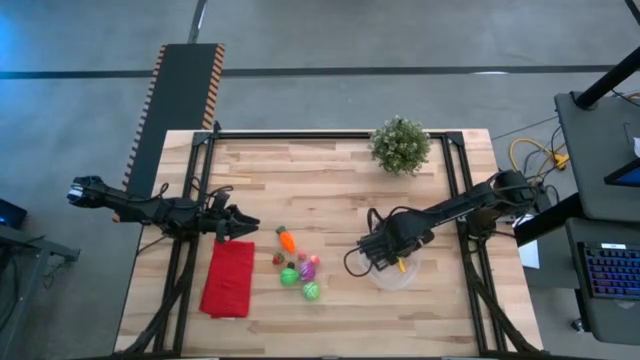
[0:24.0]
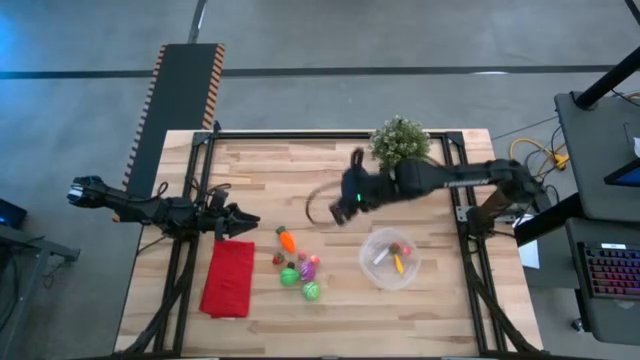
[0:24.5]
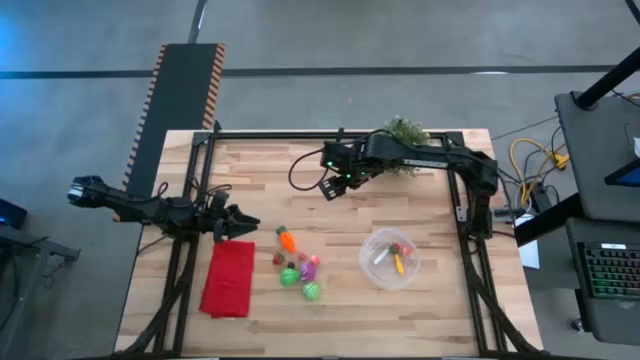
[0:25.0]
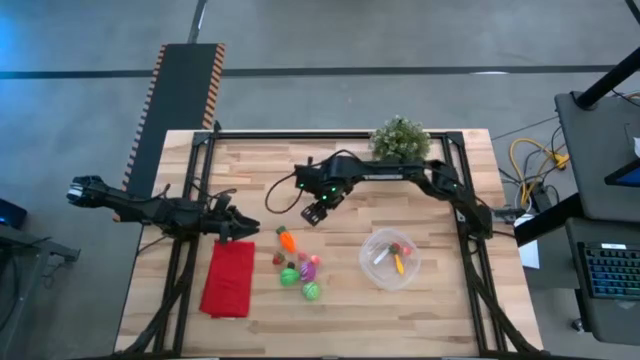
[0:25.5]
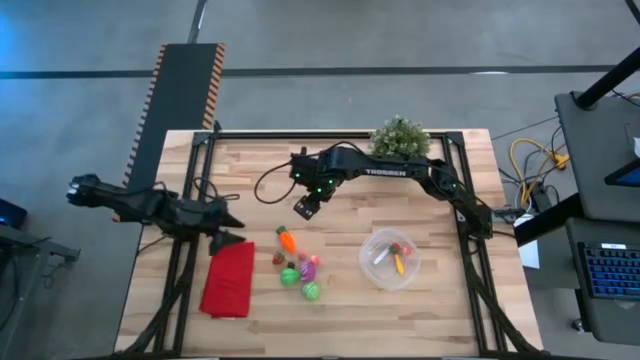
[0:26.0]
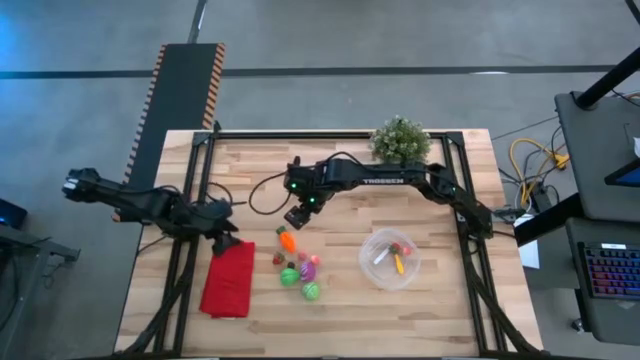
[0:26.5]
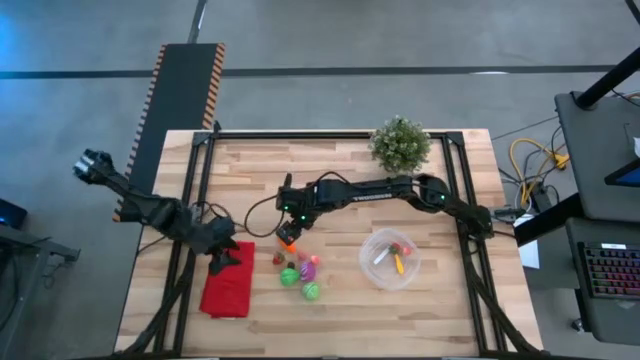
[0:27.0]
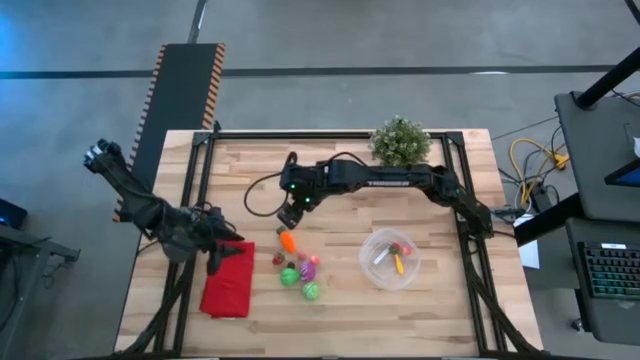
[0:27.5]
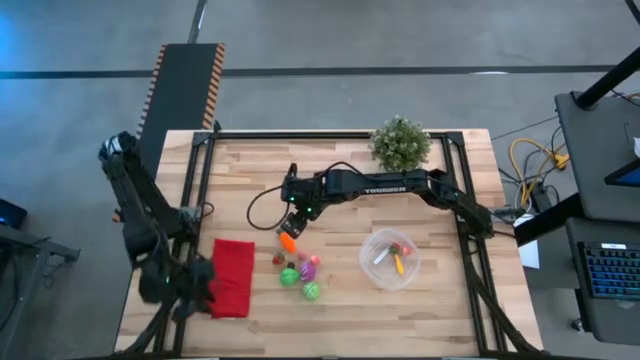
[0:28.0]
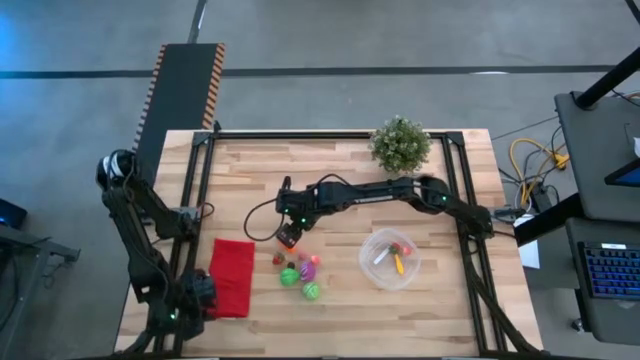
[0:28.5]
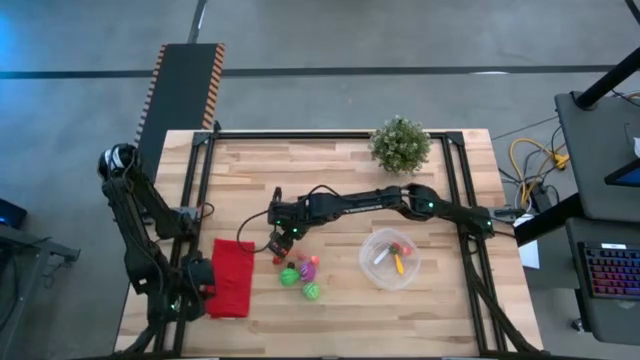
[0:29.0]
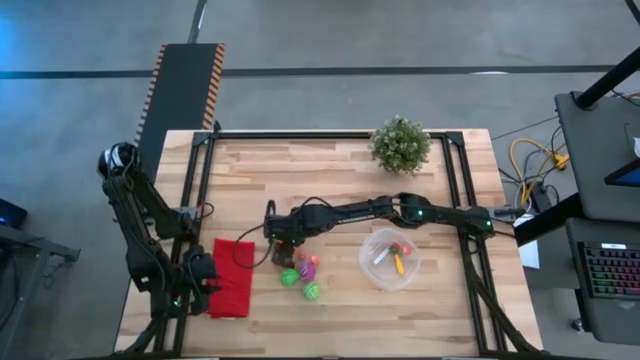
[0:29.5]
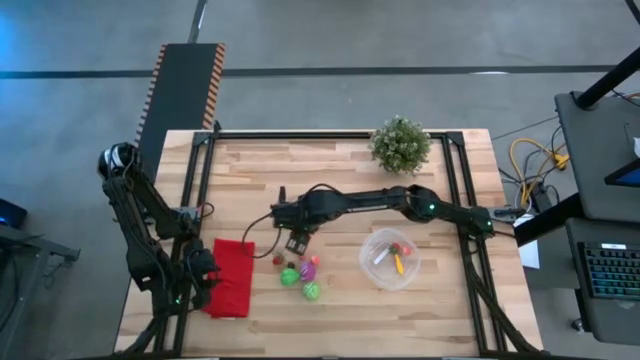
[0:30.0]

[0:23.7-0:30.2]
Task: Pick and placing Produce into tupperware
Put the orange carrot into the transparent bin

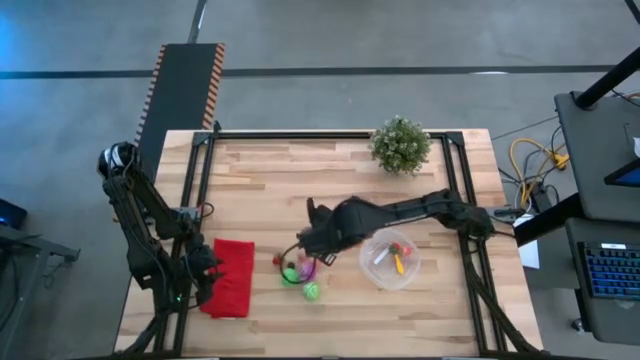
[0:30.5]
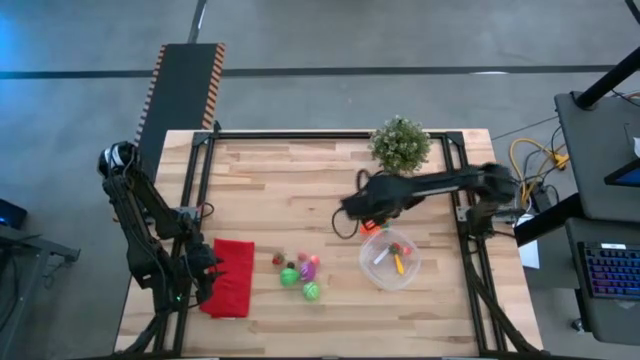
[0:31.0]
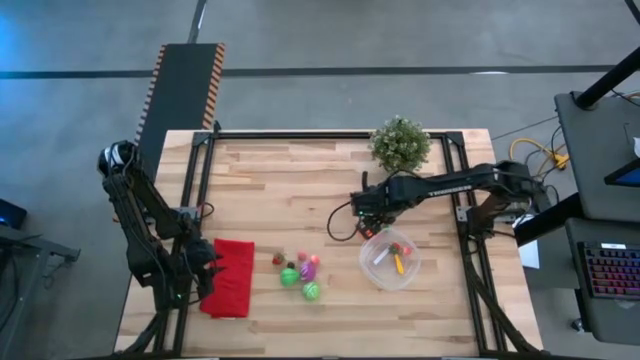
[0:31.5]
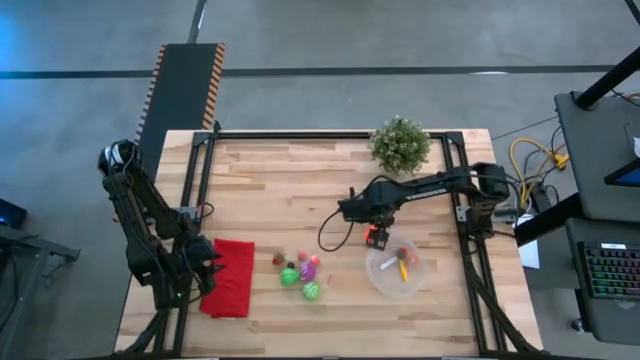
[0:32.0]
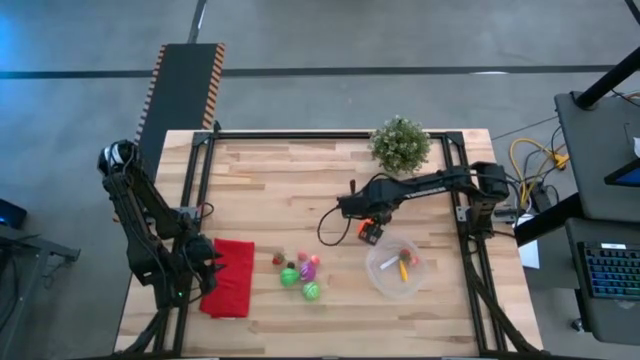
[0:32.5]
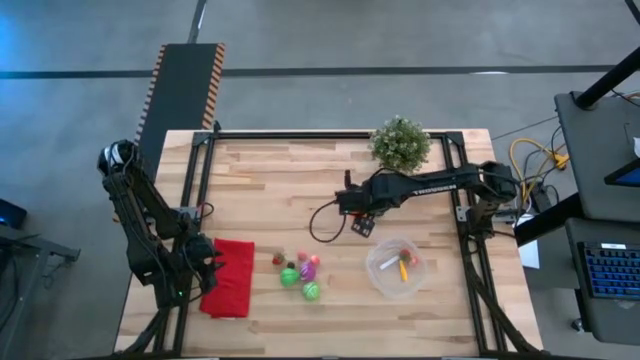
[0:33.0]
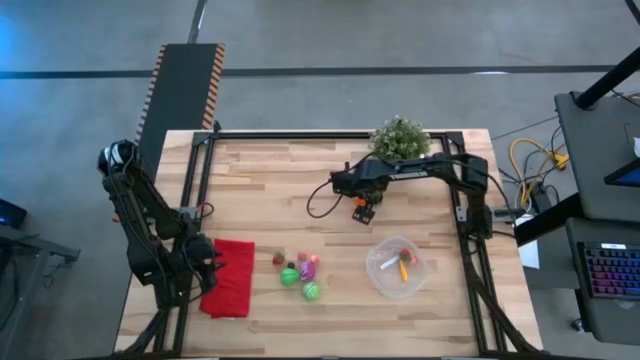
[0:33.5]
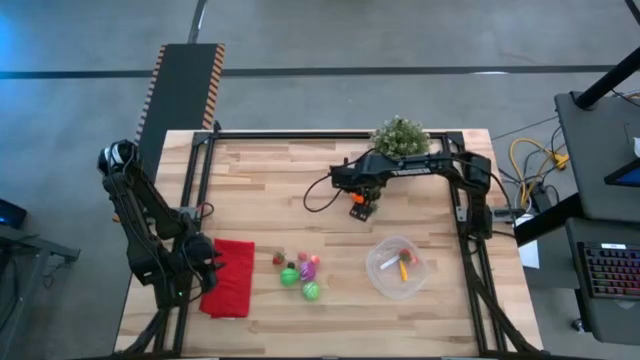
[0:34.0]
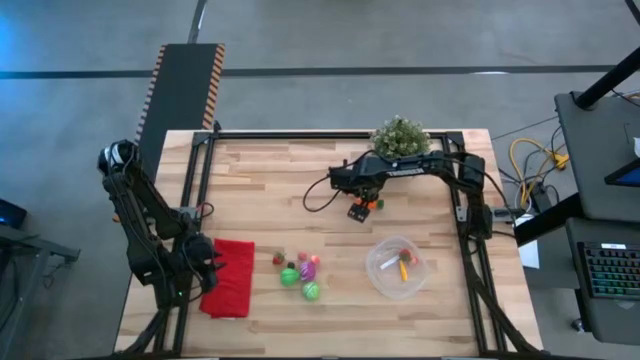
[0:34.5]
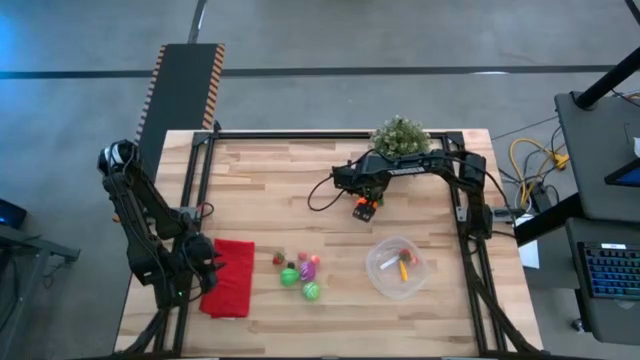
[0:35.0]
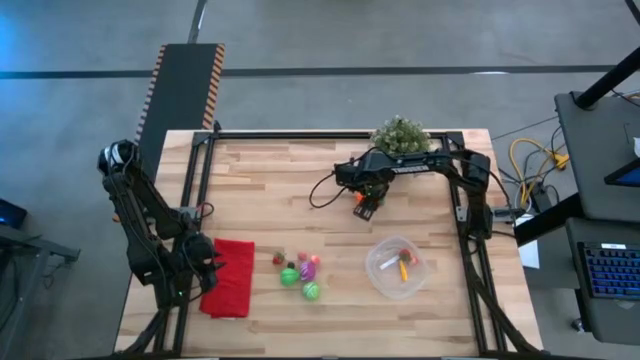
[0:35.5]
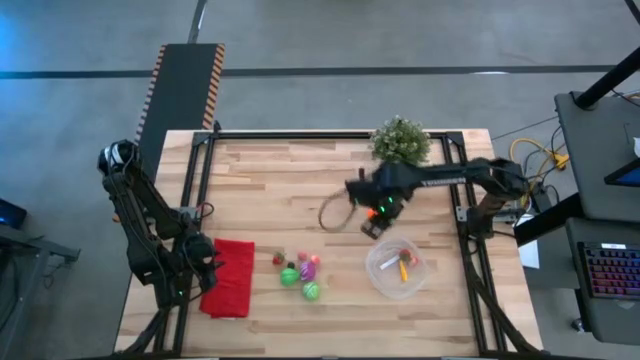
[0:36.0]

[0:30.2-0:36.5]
Put the orange carrot into the transparent bin

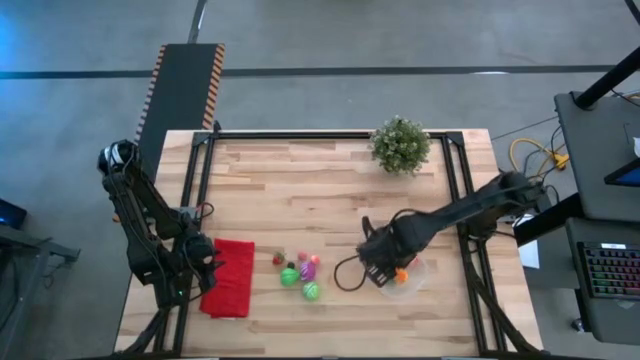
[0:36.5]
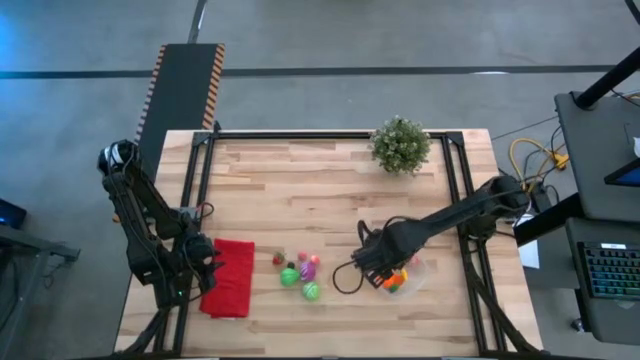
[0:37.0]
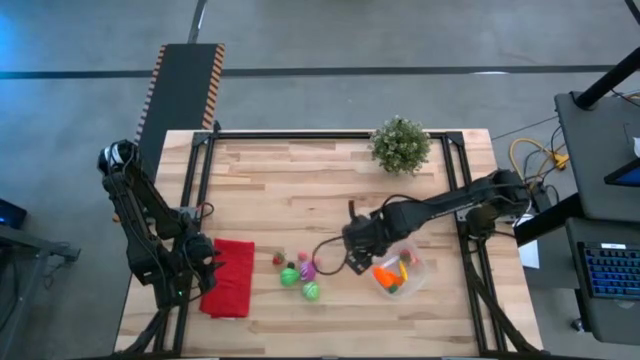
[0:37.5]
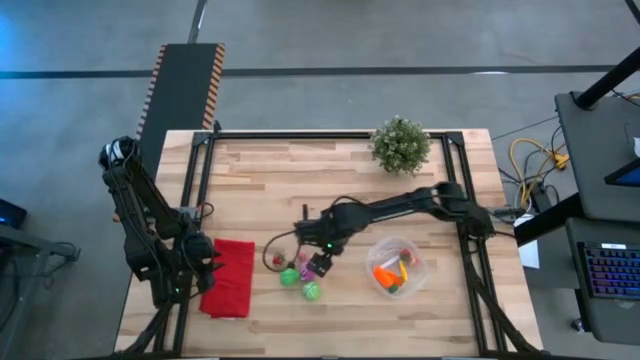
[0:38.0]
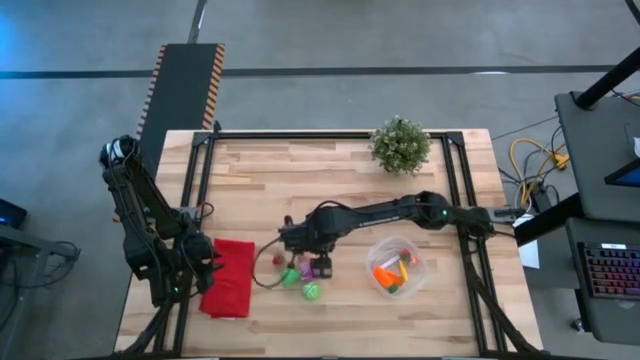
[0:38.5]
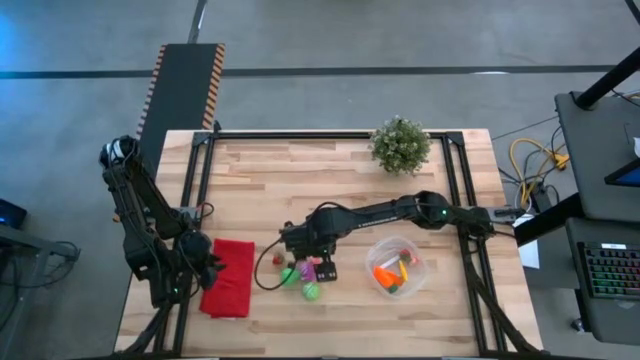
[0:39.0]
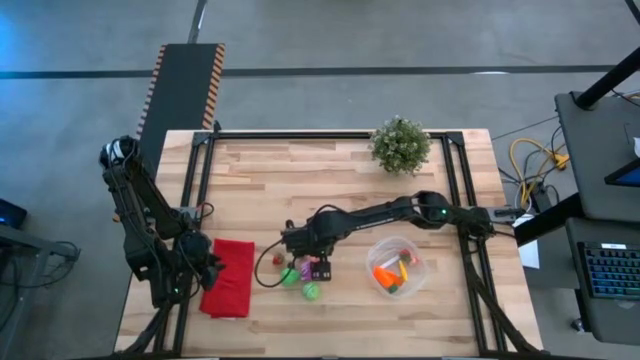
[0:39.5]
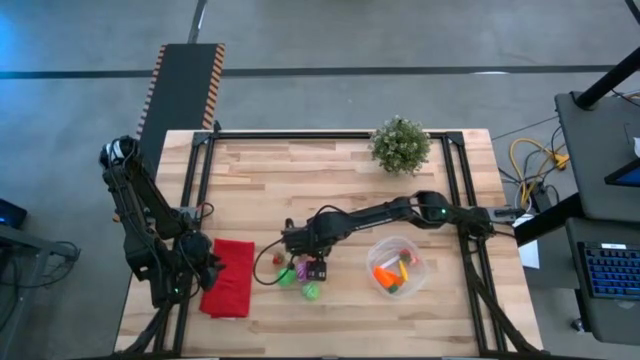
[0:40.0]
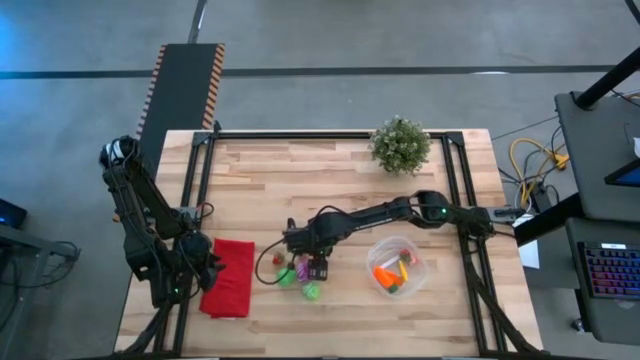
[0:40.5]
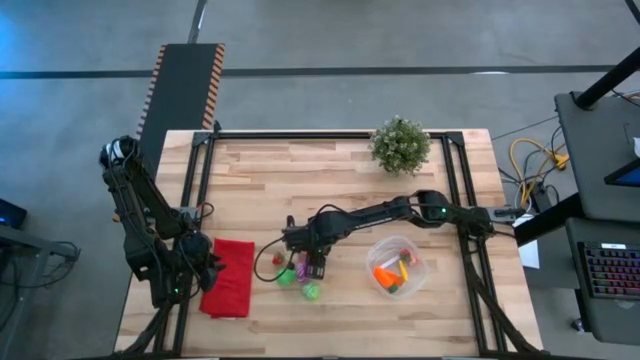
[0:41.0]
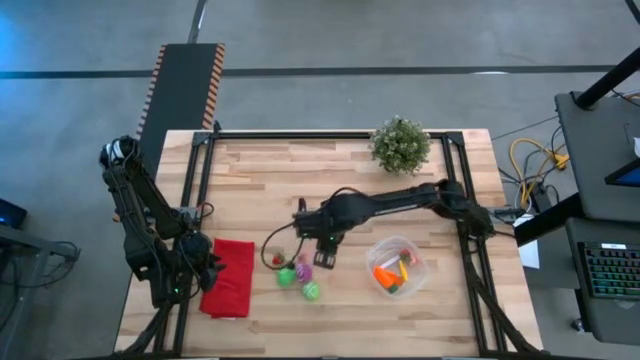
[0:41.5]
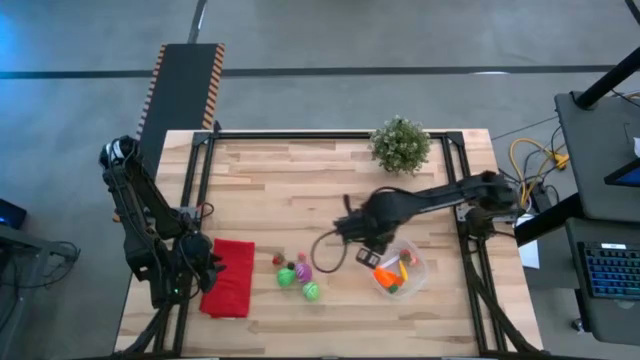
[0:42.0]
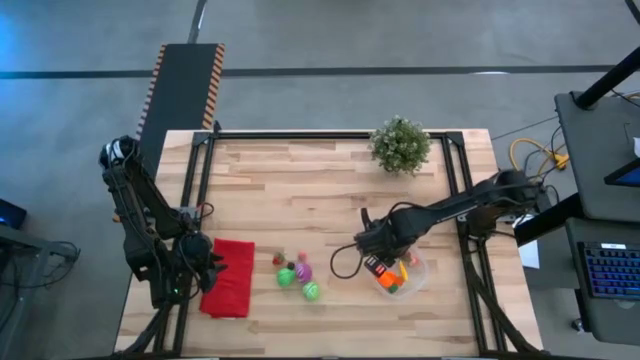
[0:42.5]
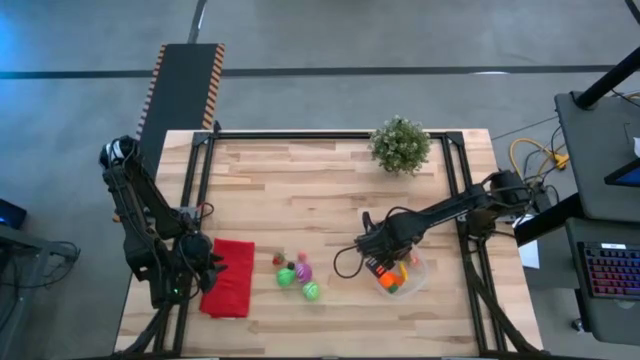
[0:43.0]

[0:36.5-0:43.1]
Put the right pink peach into the transparent bin

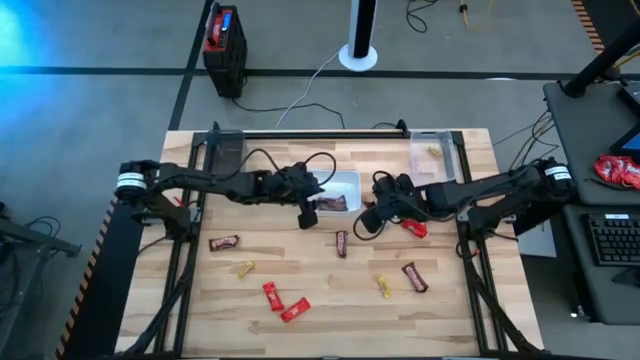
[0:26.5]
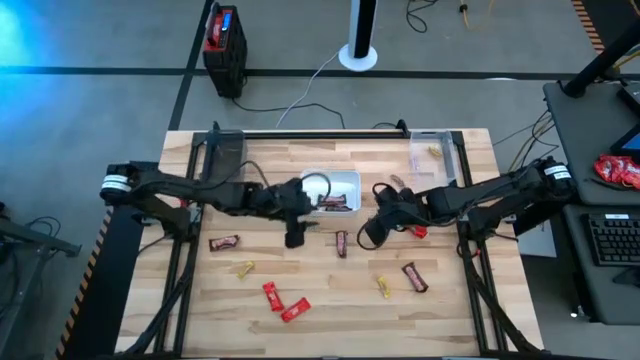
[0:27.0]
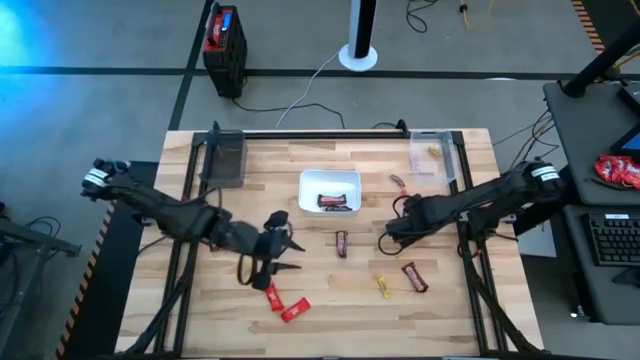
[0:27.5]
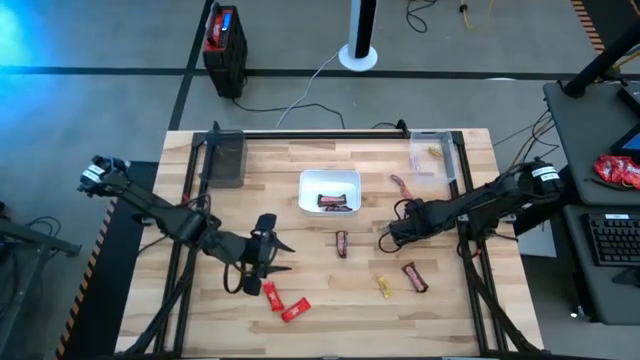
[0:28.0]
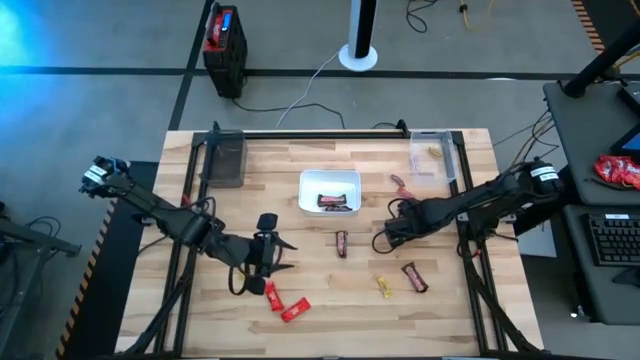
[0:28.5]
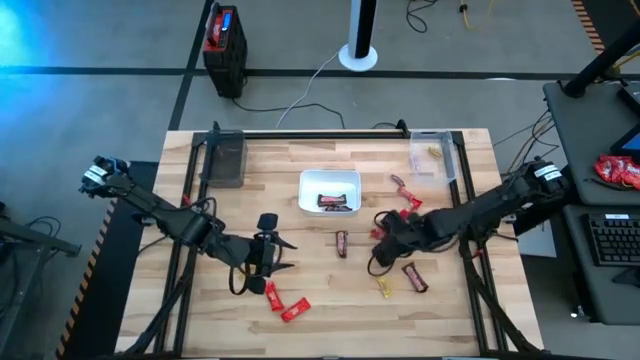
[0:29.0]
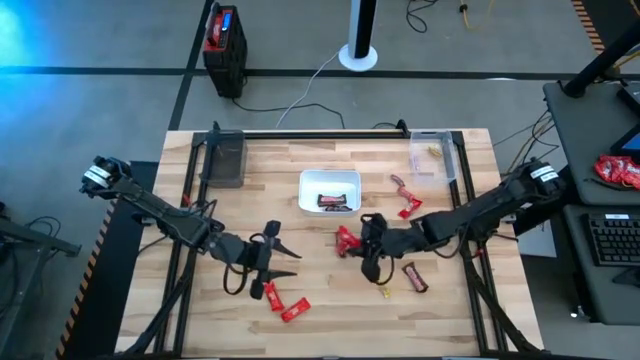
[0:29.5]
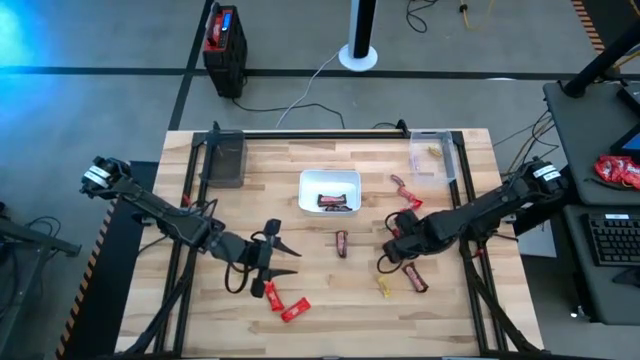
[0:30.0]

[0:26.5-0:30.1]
Task: Sort candy by brand, put in halloween buckets
Put the red chocolate bar into the black bin
